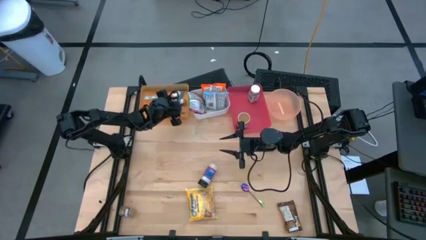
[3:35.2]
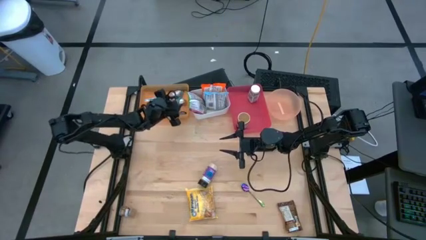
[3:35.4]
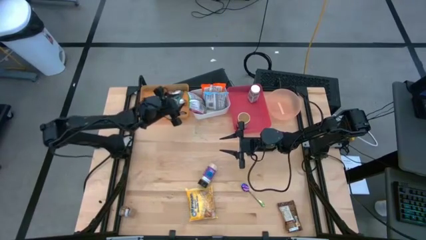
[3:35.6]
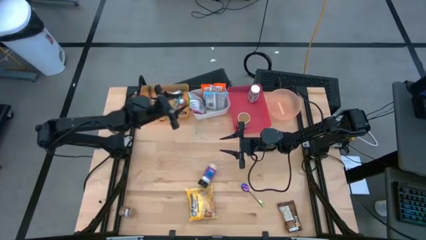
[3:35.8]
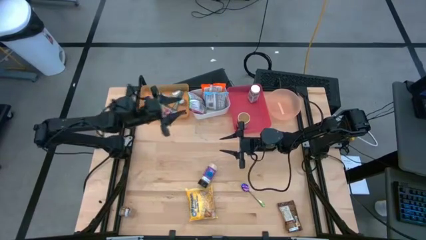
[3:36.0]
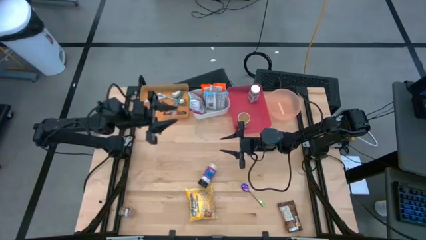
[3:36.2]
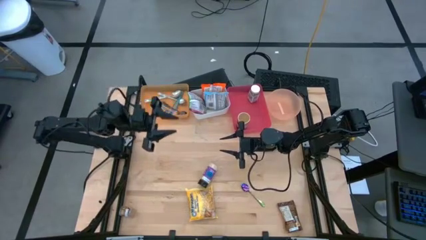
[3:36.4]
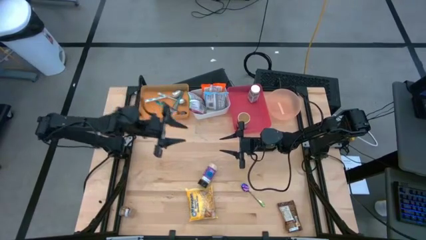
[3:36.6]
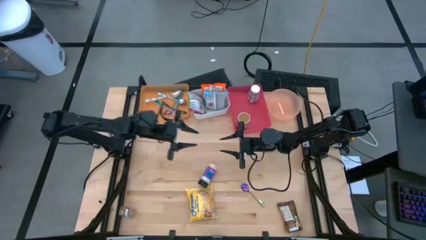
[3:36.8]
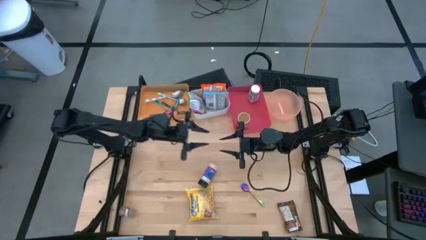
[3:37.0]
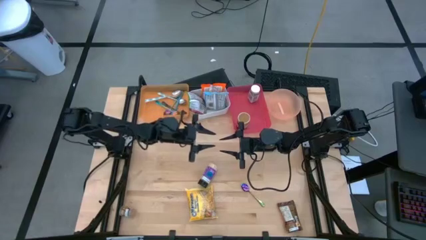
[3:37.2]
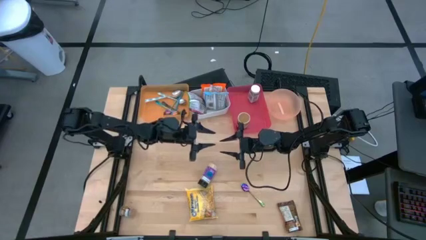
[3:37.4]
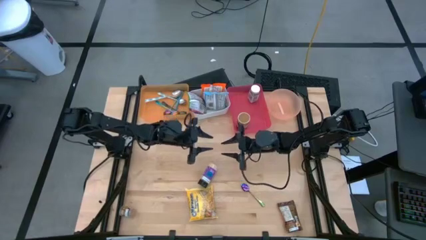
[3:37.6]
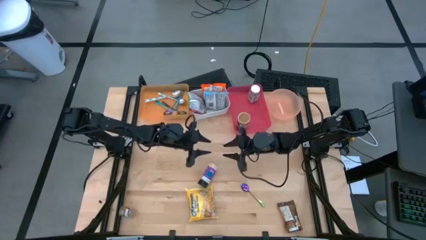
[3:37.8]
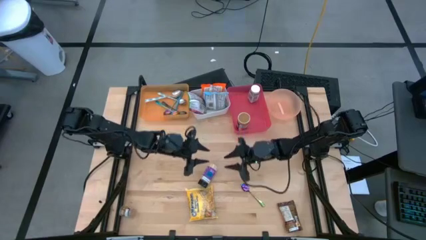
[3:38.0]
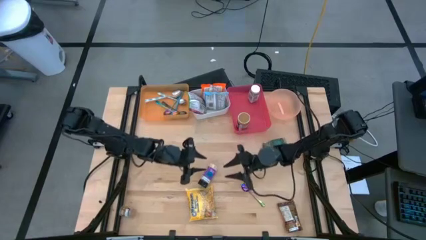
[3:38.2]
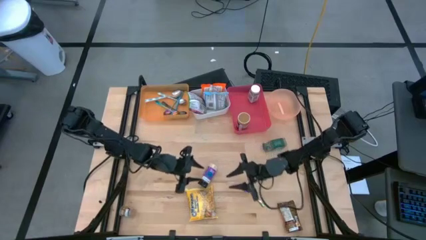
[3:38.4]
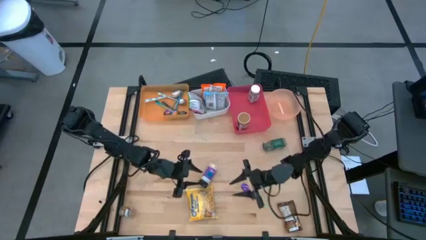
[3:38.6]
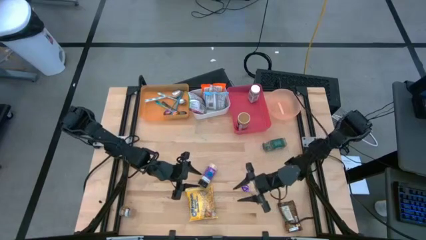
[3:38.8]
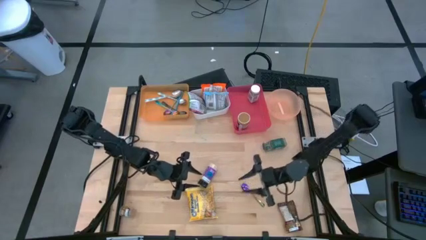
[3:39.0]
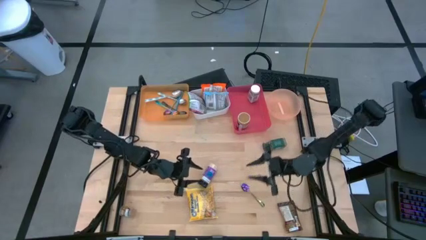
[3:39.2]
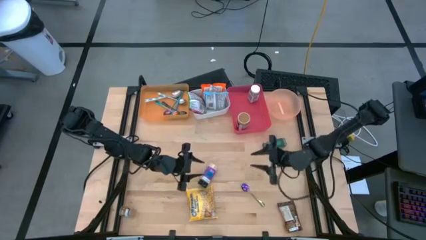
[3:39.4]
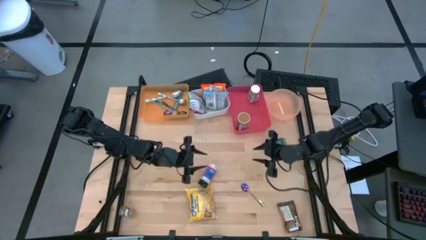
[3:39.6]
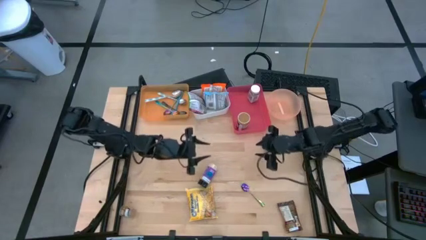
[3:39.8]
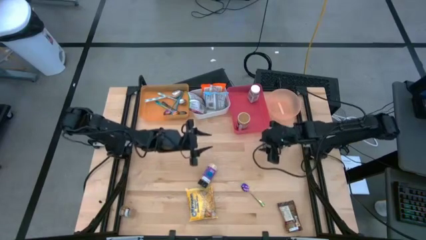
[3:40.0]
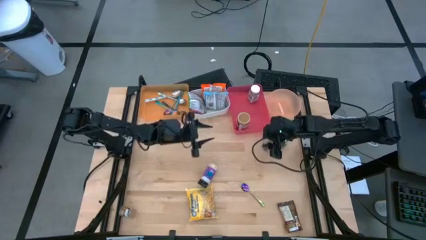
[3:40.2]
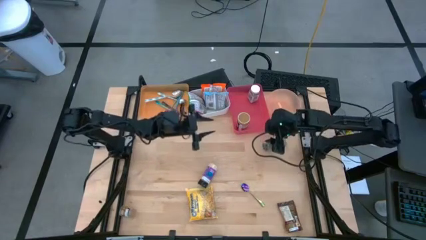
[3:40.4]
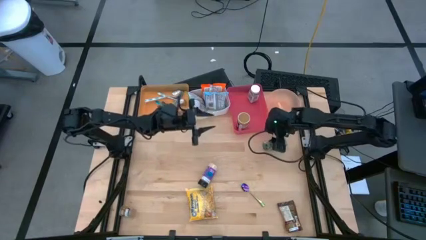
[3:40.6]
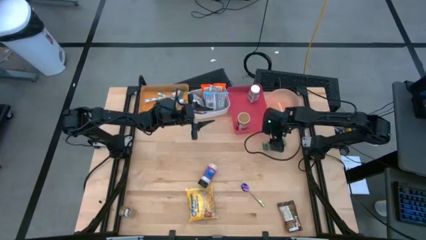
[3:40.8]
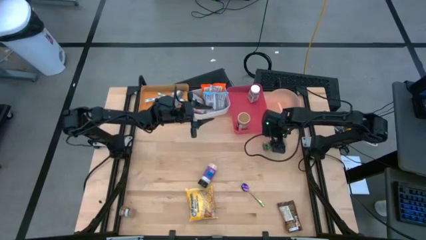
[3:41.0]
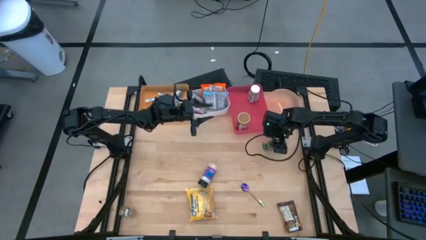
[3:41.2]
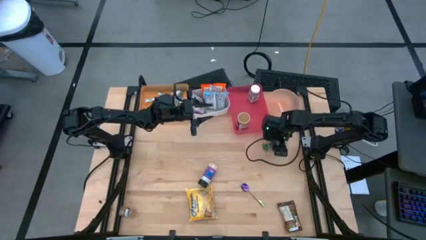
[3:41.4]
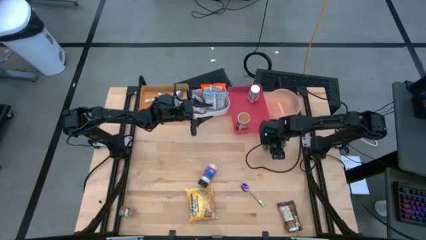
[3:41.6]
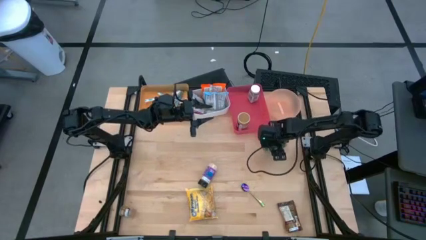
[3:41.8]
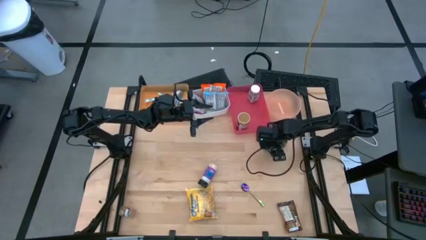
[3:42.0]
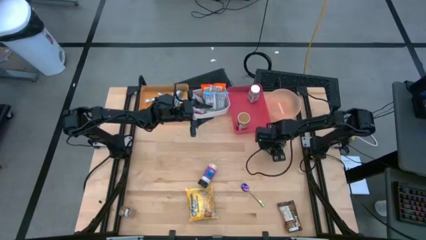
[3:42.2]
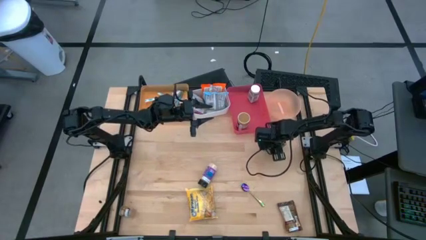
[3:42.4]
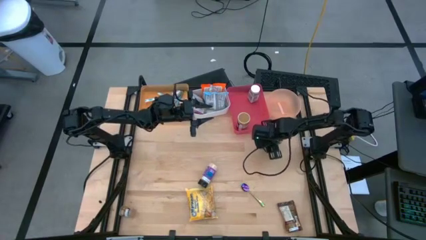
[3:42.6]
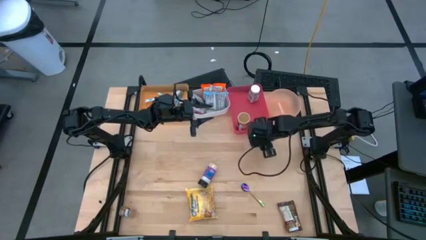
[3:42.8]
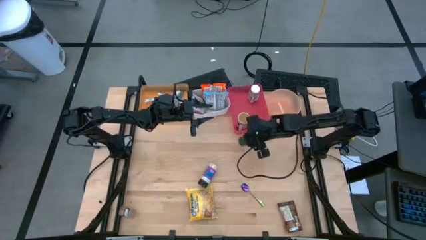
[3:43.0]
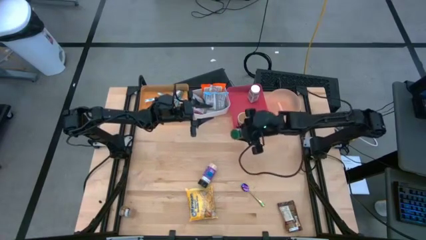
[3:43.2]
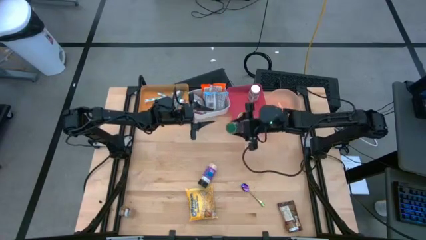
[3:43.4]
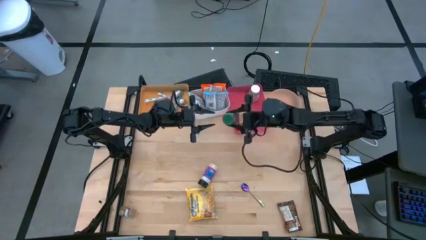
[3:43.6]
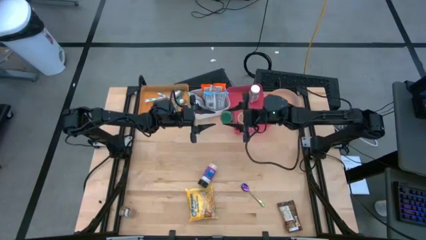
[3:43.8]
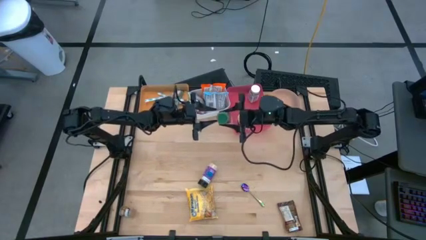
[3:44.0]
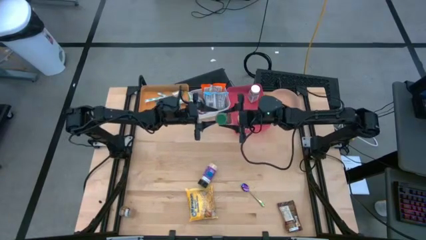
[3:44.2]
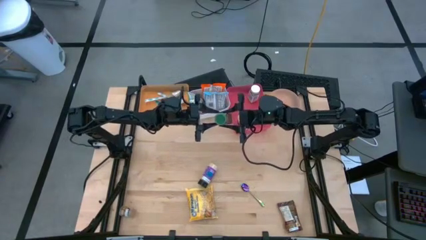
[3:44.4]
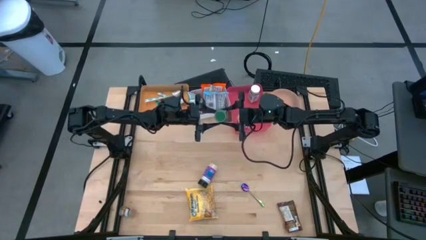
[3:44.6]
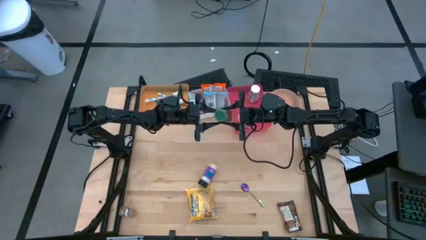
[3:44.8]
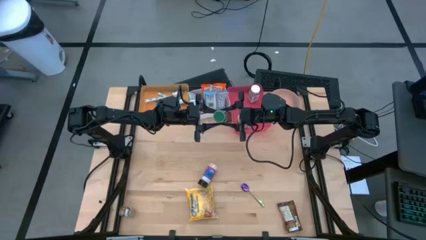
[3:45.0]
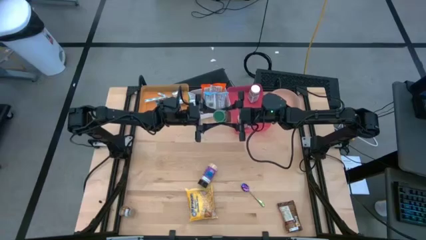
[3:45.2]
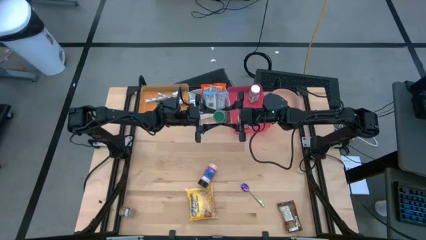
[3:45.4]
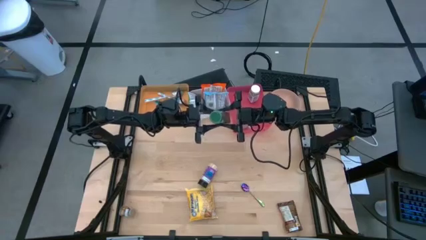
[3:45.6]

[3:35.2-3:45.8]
Task: Pick & Place Food Item
Put the green seasoning bottle into the pink bin
